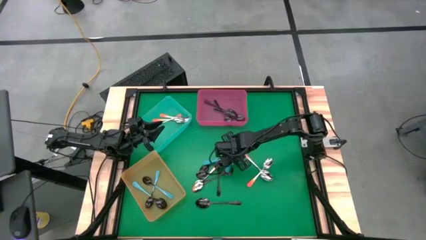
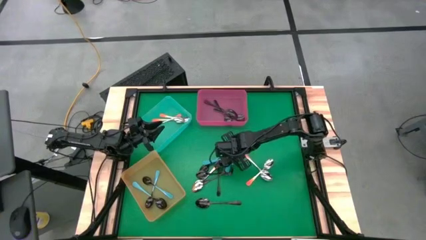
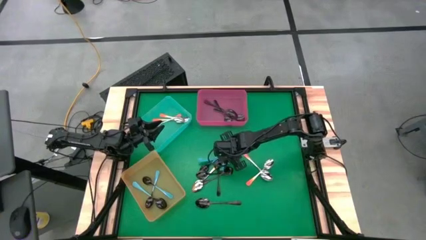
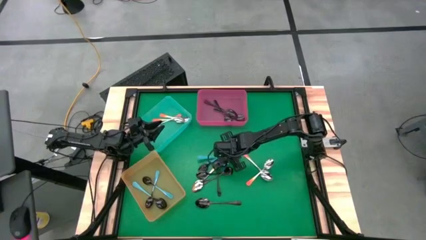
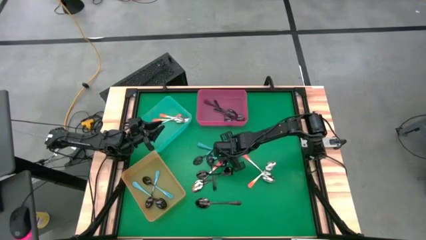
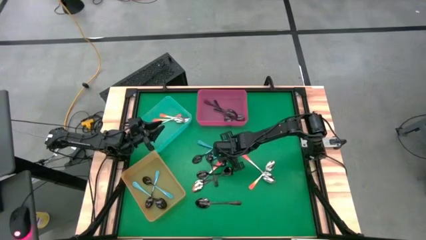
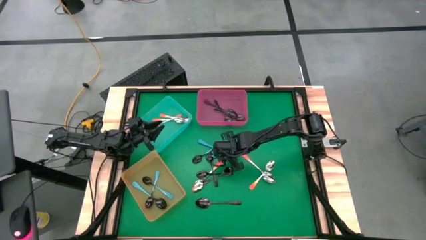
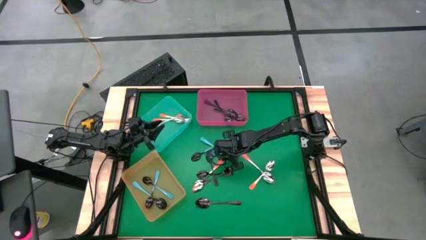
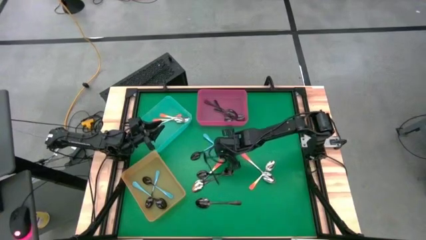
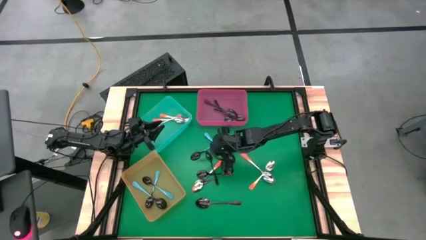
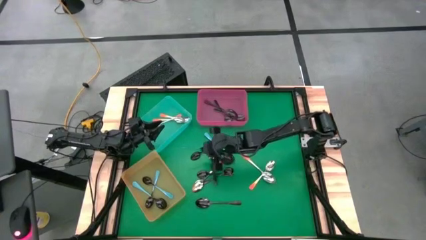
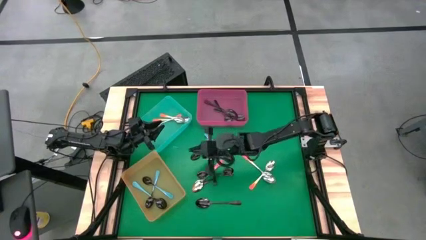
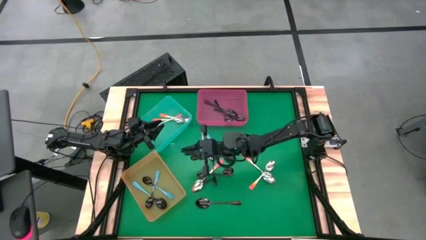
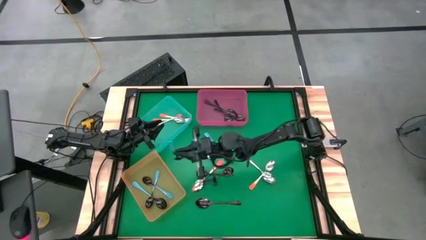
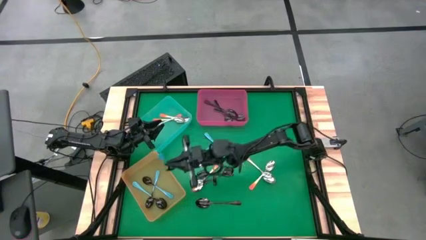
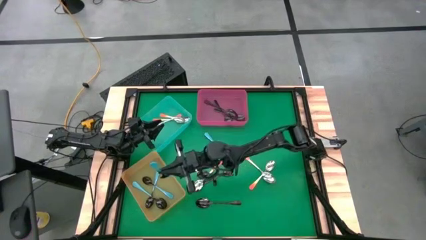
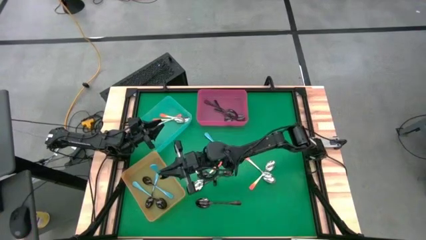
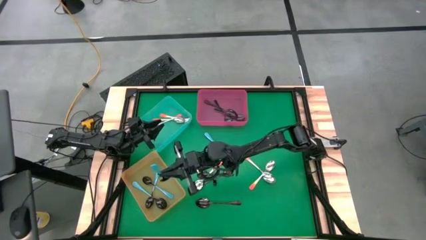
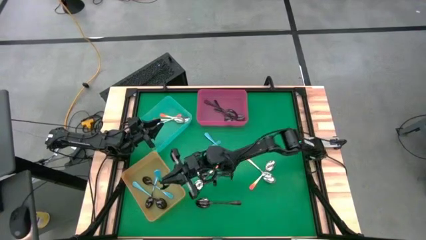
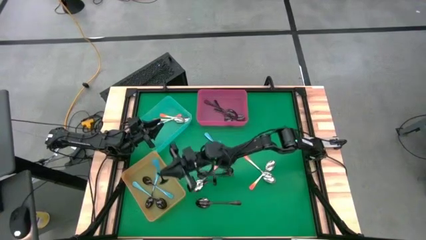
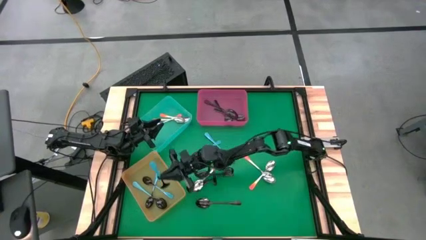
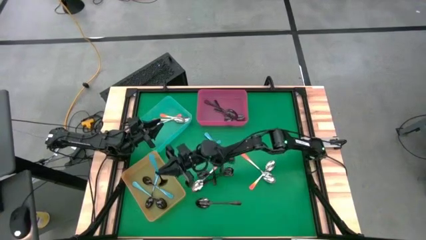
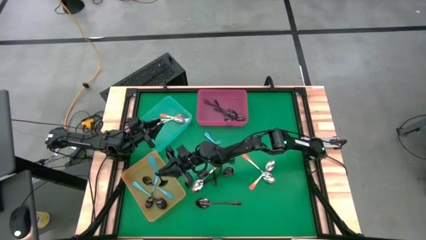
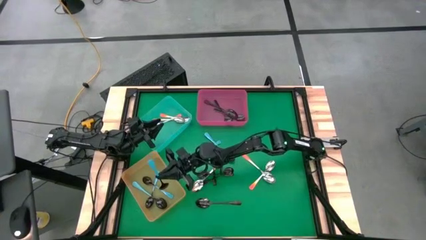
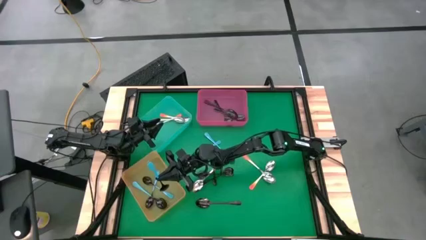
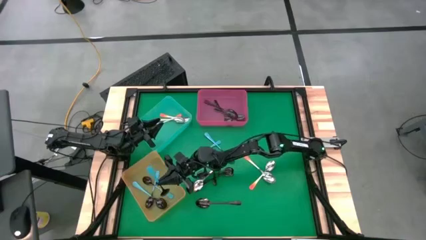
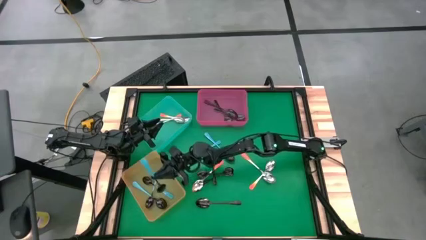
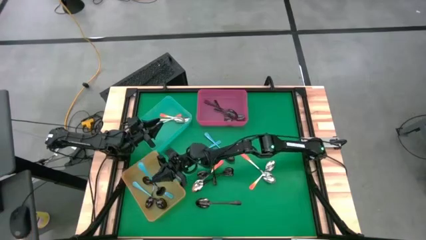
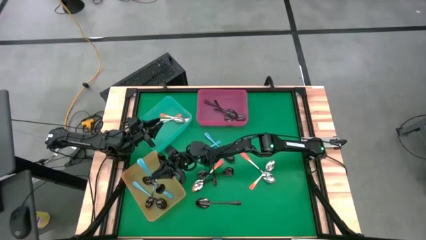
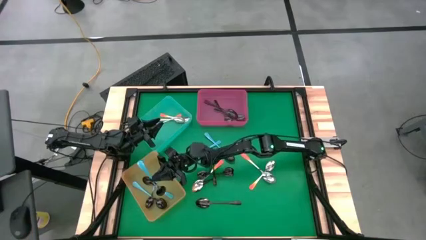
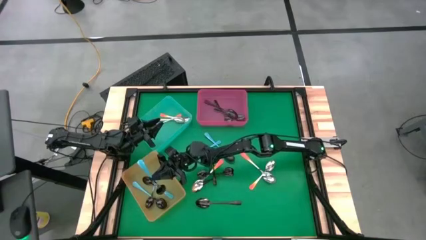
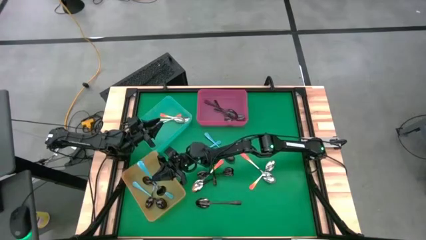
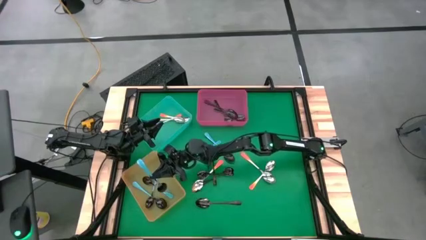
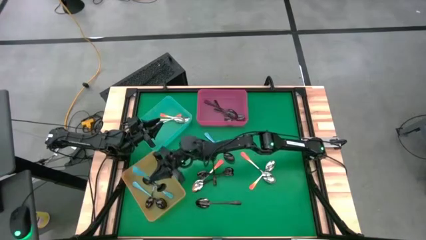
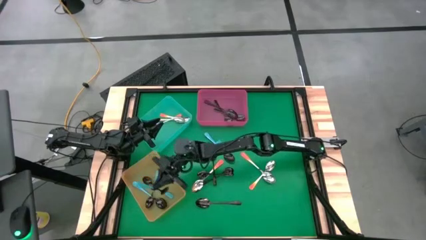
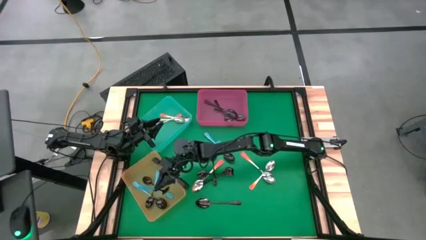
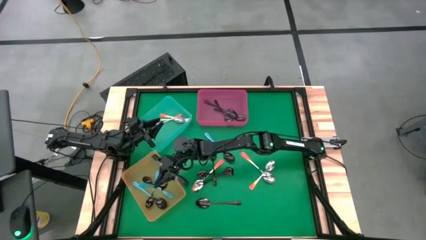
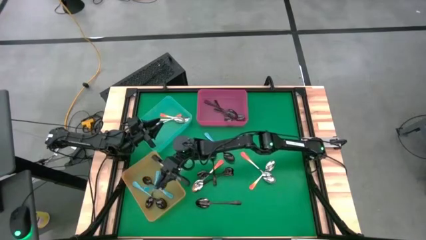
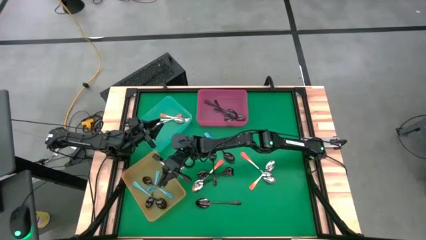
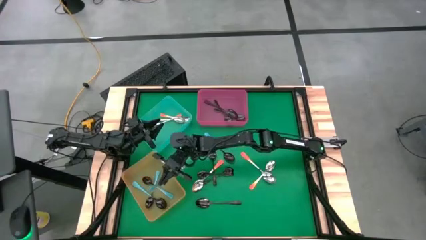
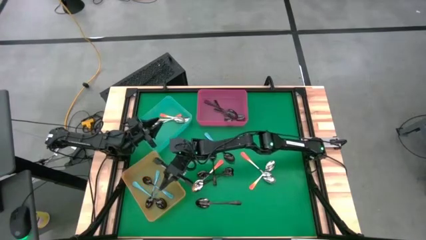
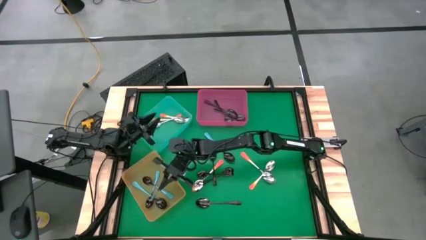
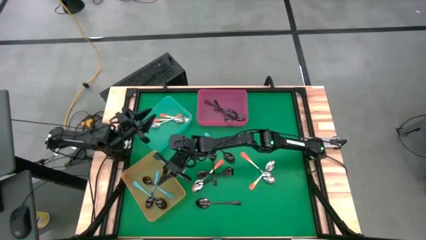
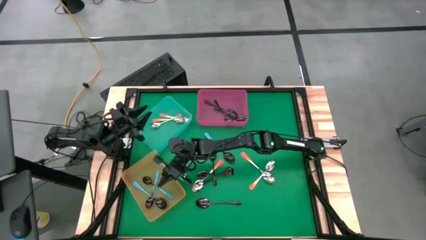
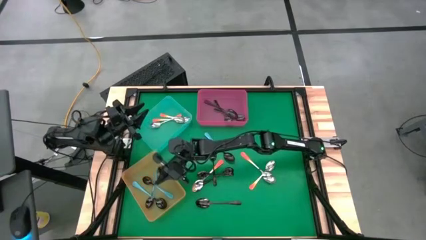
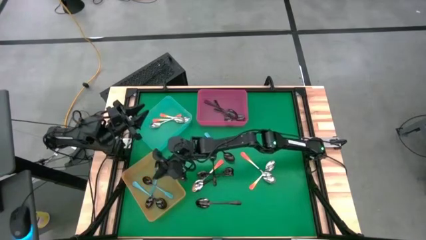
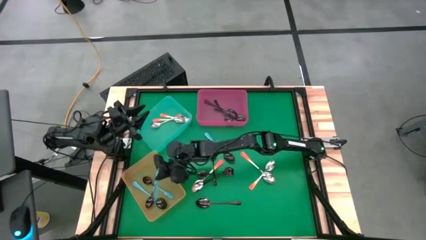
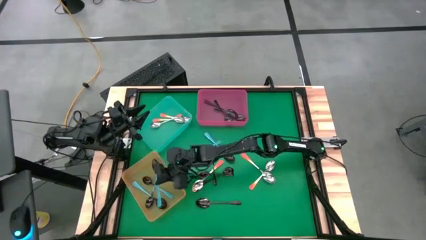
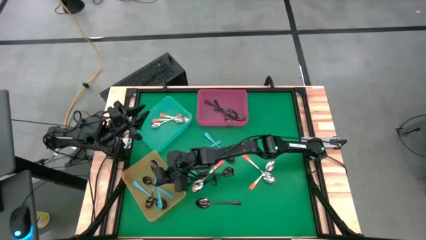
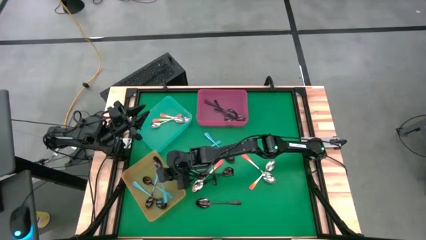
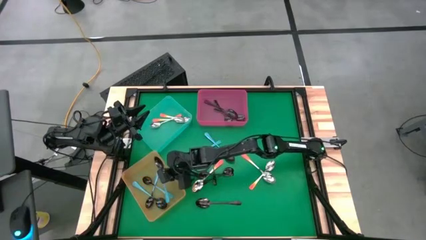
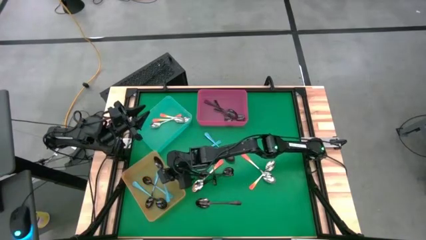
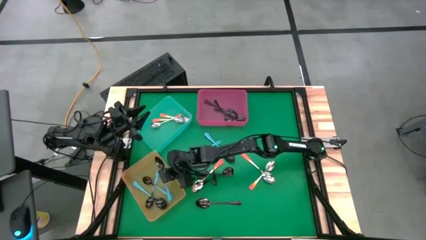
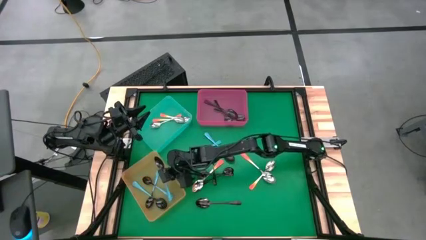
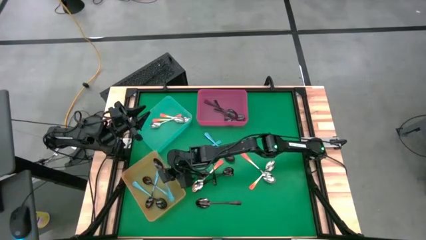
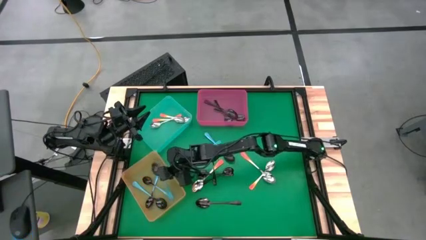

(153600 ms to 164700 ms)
Task: Sort silverware by color (type)
Put the blue spoon into the orange bin

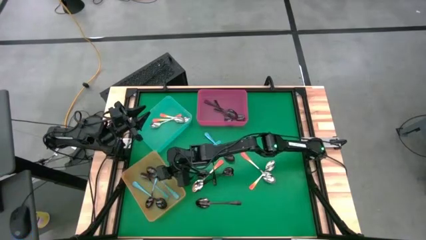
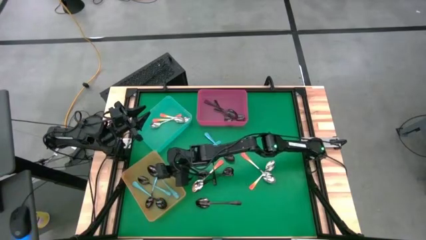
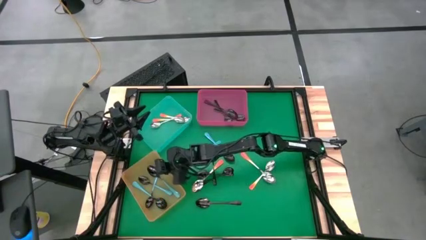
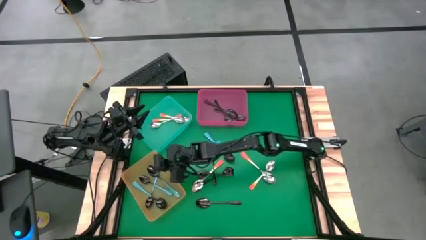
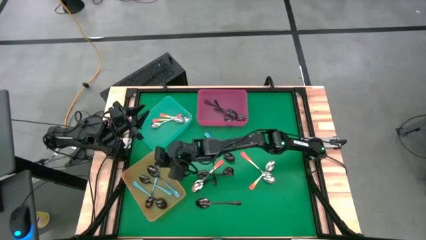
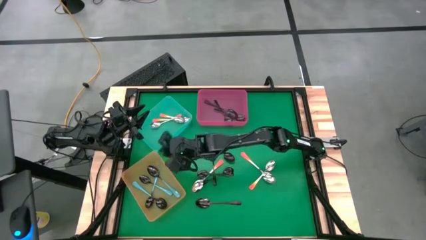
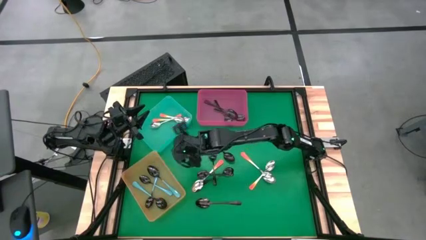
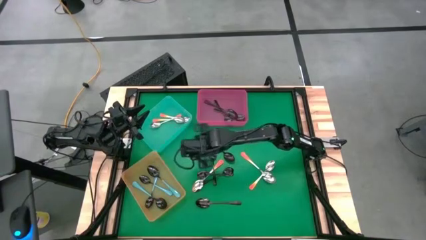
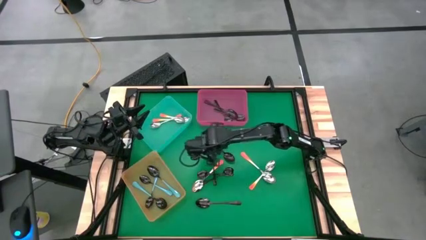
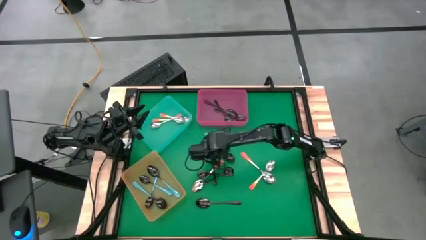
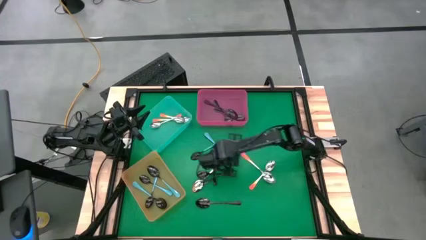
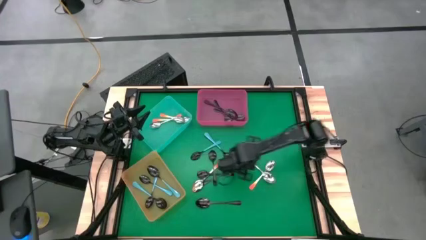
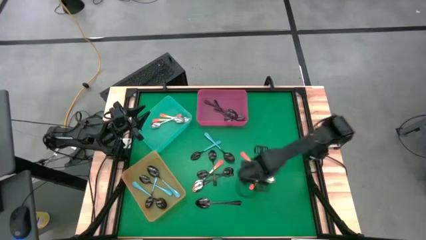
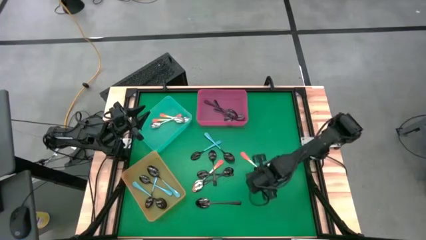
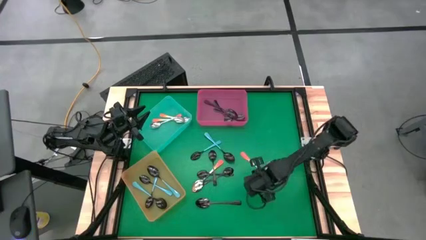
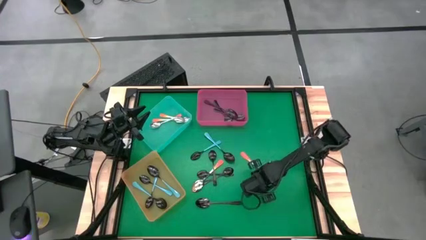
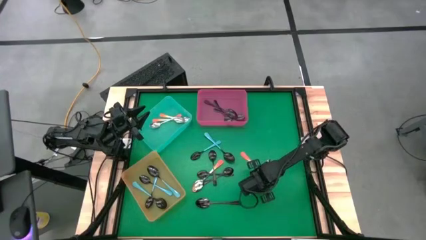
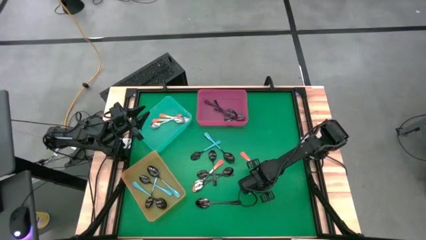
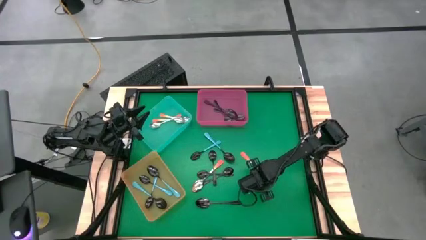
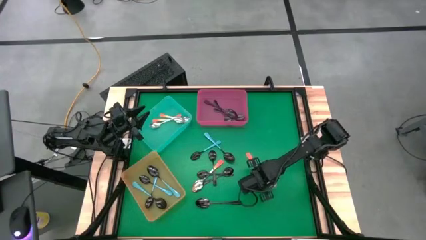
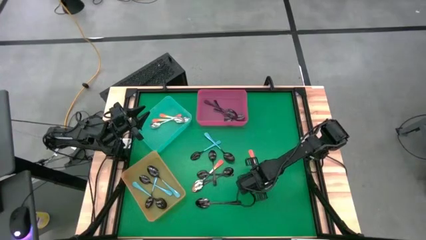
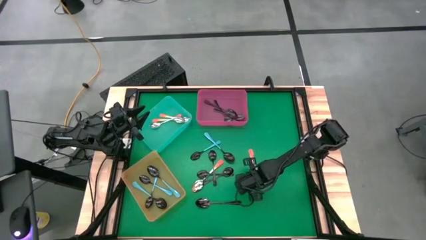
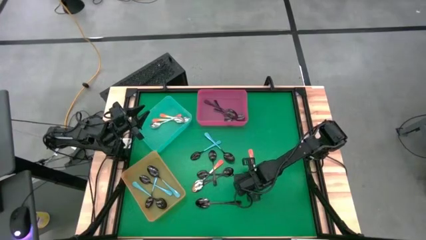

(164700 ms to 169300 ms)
Put the orange spoon into the blue bin

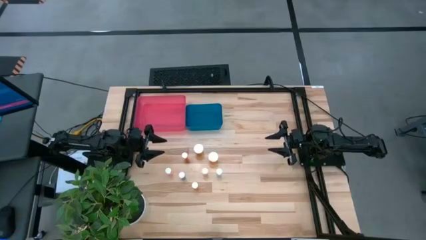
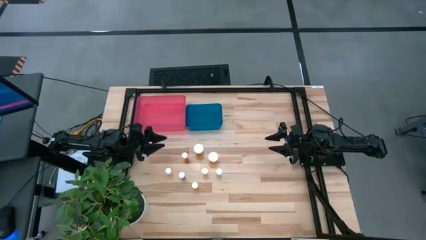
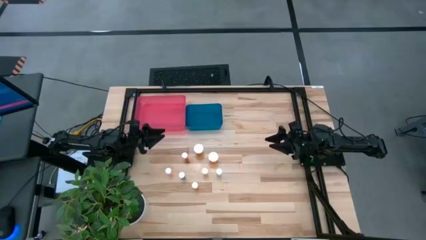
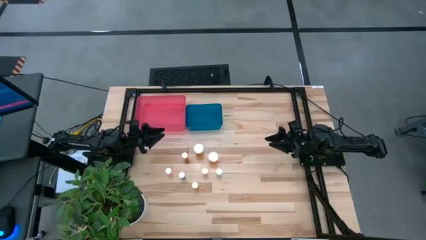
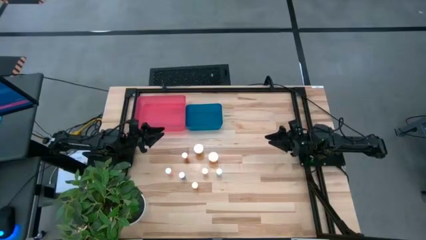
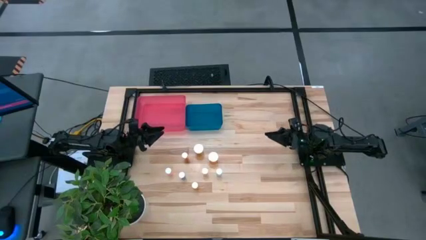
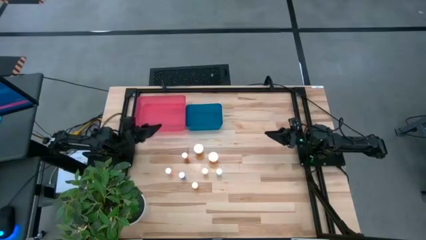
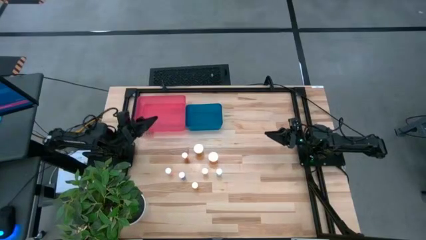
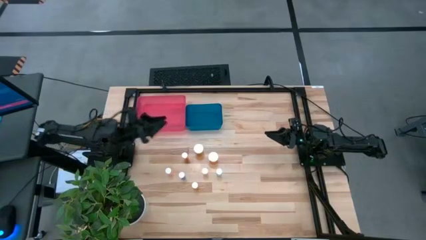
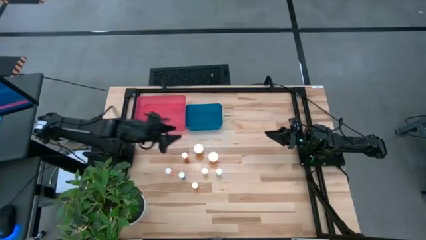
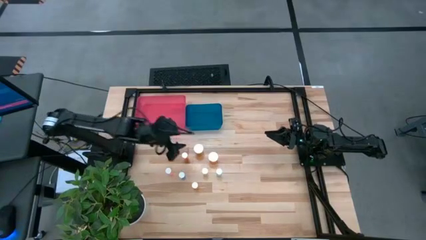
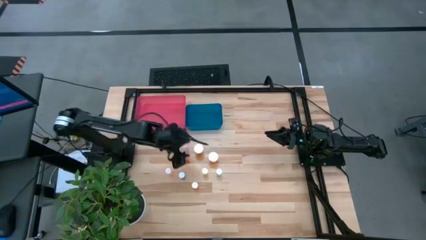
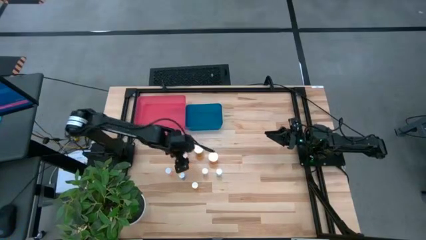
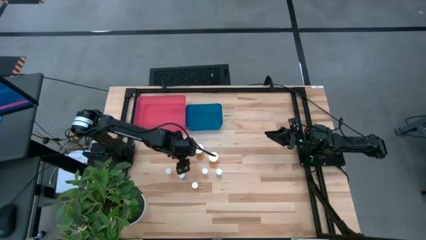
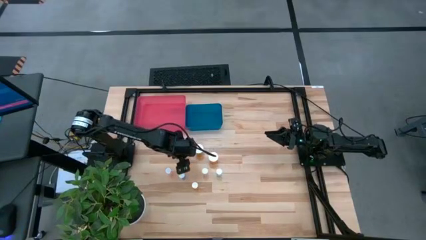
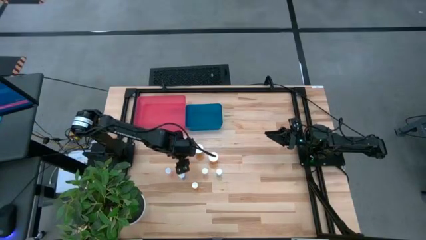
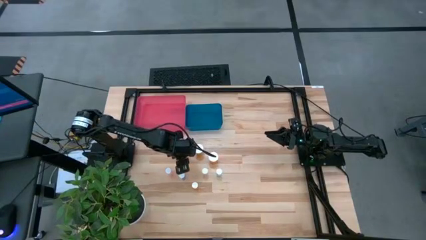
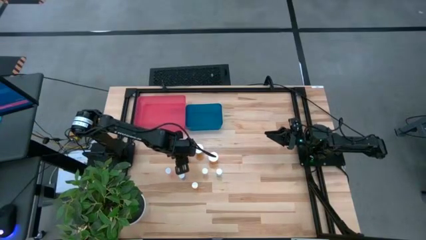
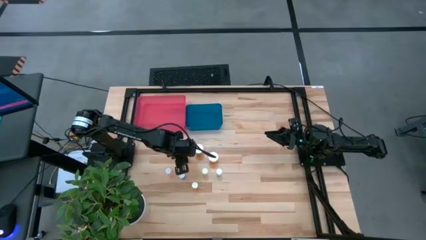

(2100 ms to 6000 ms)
Task: Pick and place medicine bottles into bin by pill shape (circle, oval)
Put the orange capsule bottle into the blue bin
